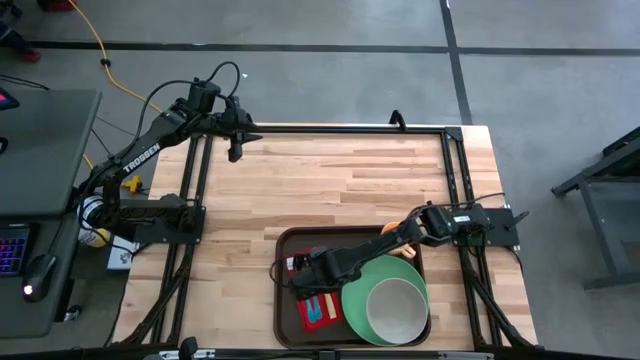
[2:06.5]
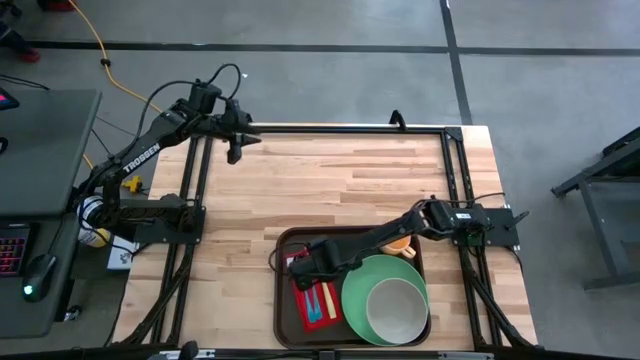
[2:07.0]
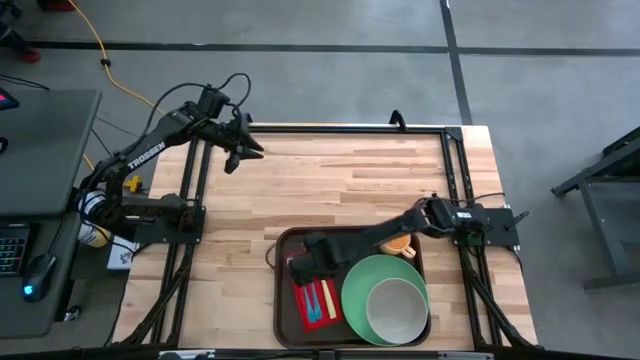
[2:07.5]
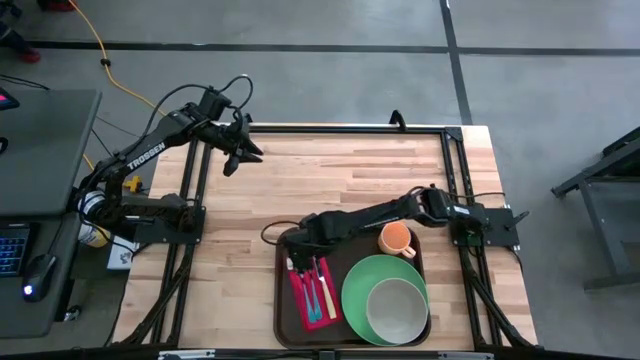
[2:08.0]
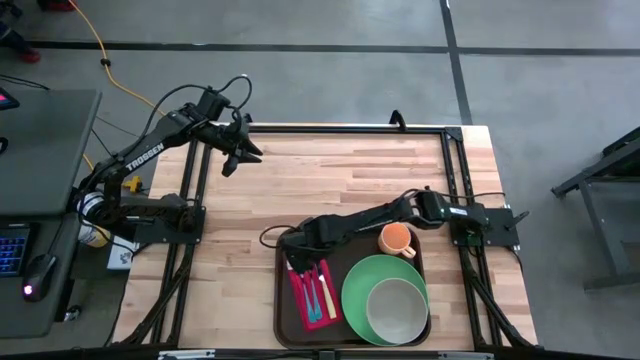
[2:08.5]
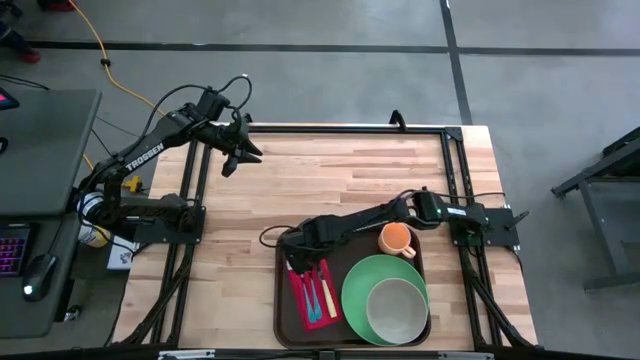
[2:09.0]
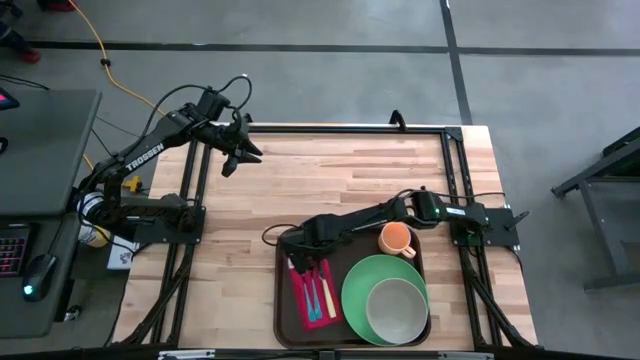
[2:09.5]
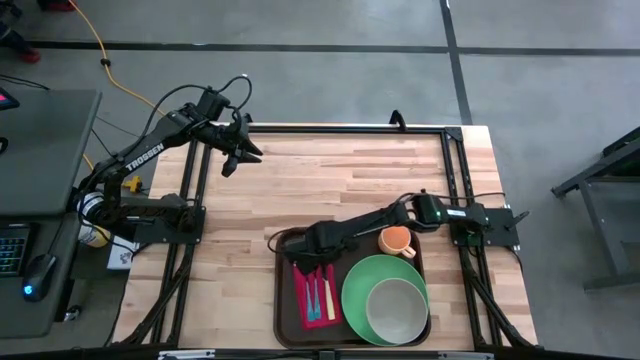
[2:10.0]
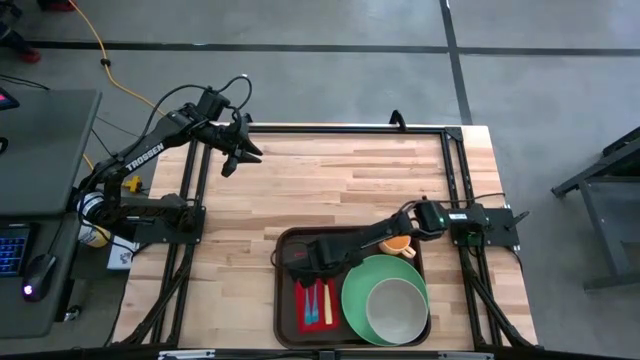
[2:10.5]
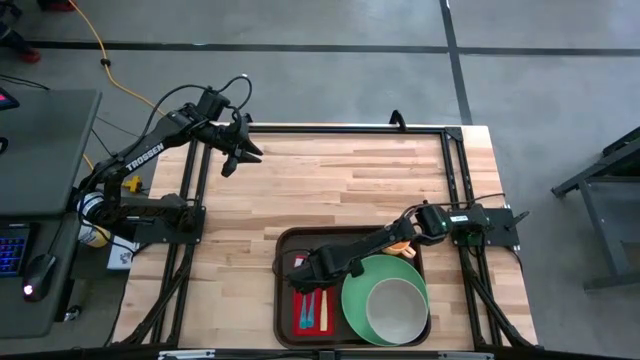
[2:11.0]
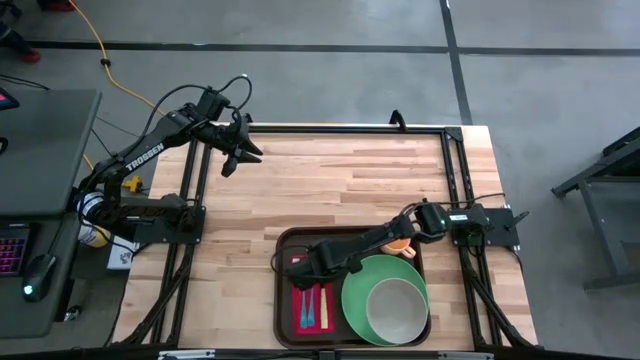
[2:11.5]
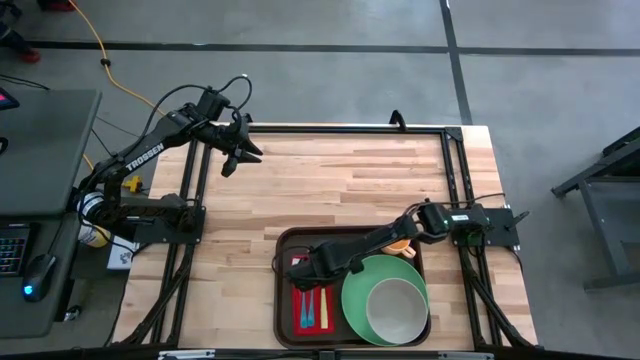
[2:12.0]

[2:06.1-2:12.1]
Task: Set up tray
Adjust the red cloth table napkin

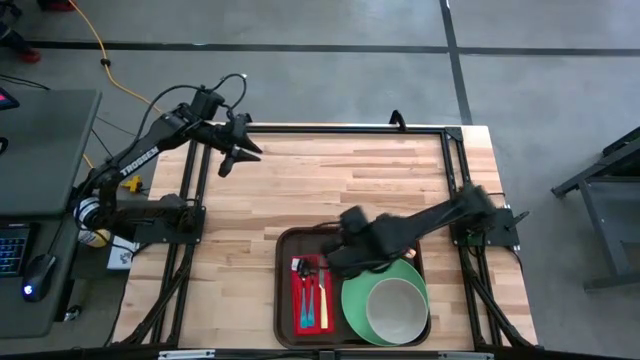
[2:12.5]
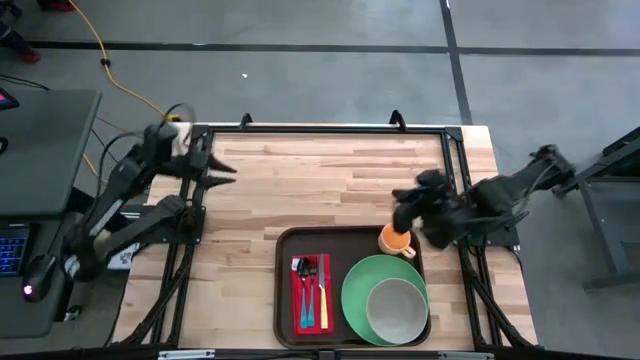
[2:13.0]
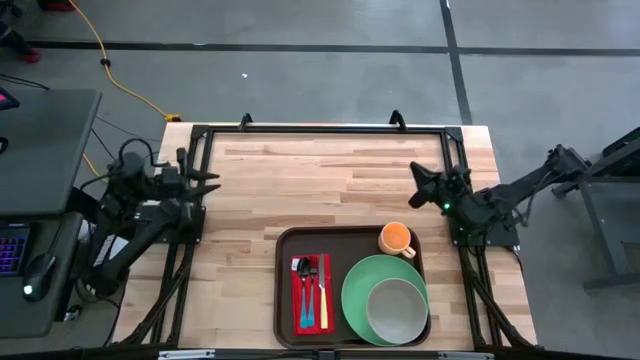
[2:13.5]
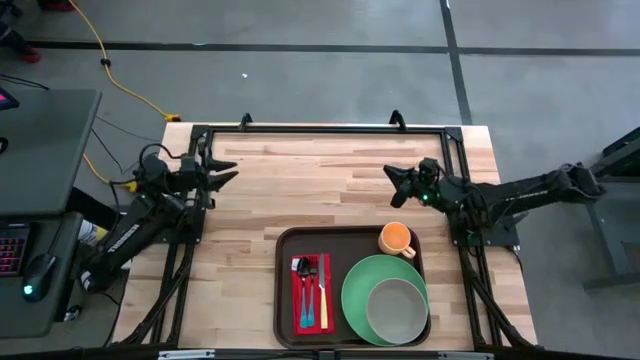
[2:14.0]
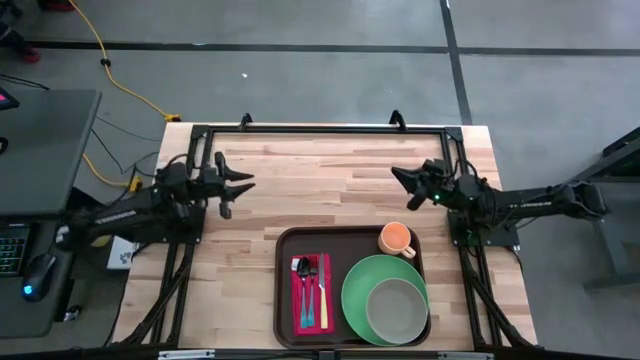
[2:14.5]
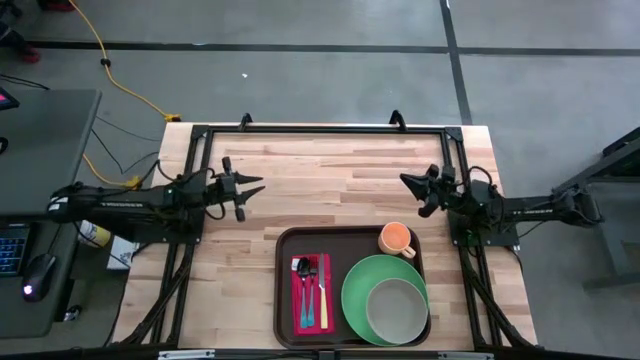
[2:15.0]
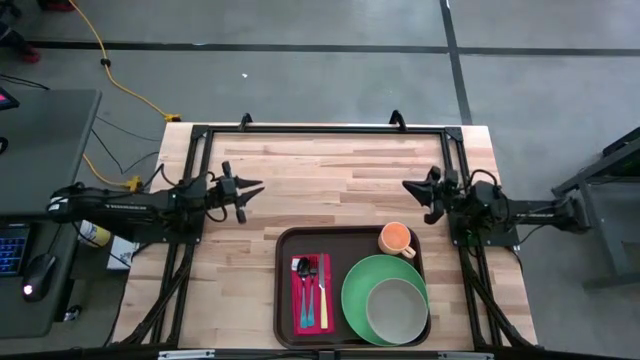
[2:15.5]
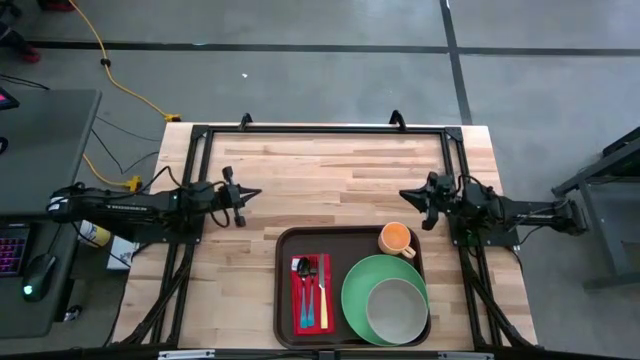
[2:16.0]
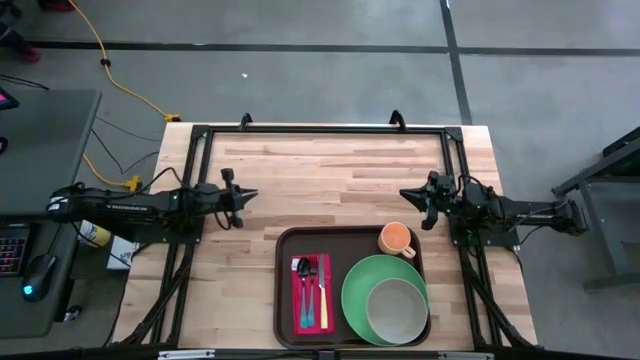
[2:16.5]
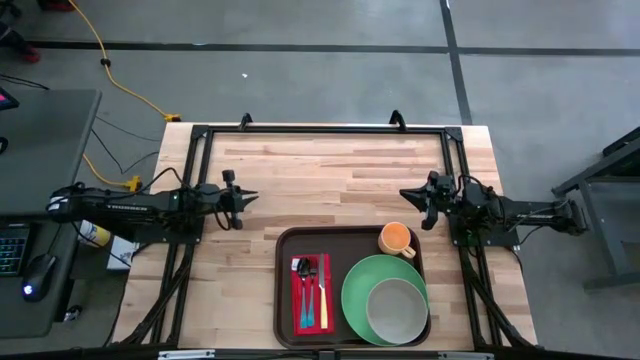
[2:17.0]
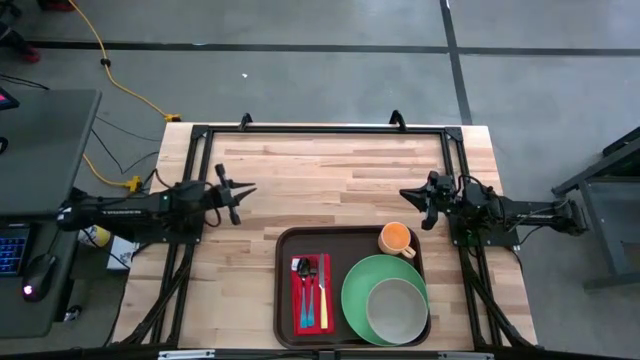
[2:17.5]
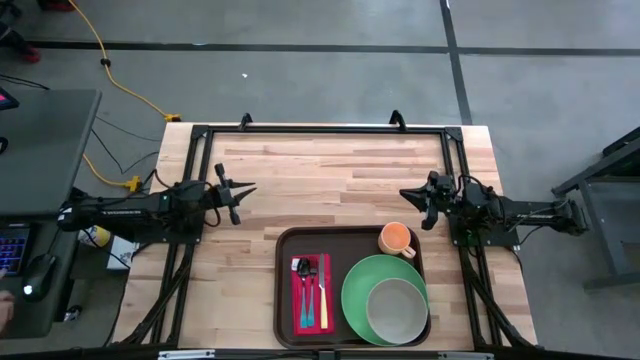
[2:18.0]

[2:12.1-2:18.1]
Return to Home Position

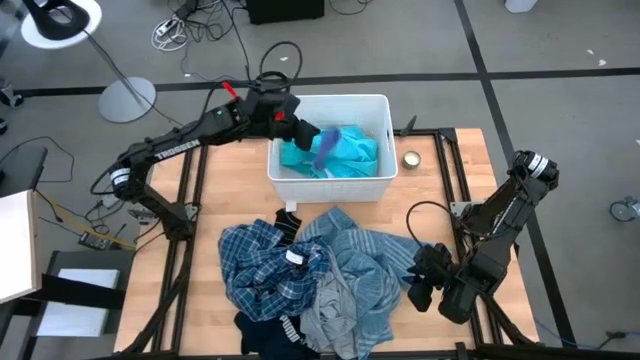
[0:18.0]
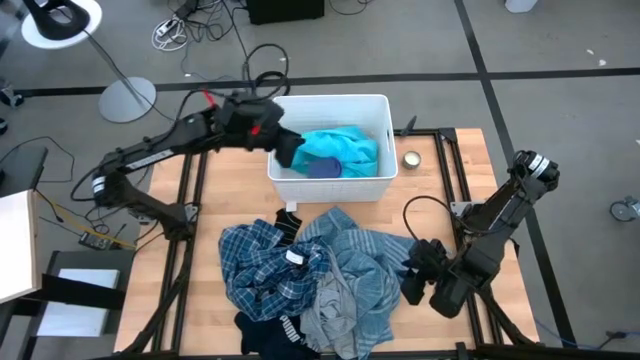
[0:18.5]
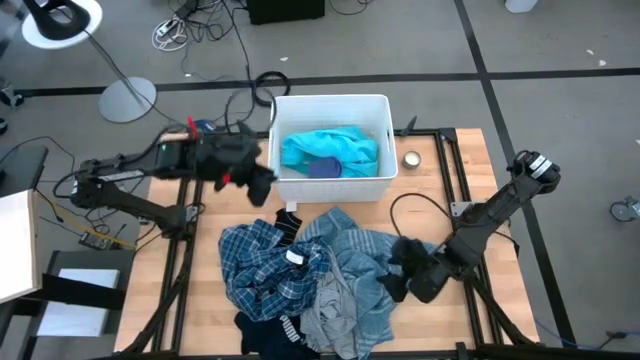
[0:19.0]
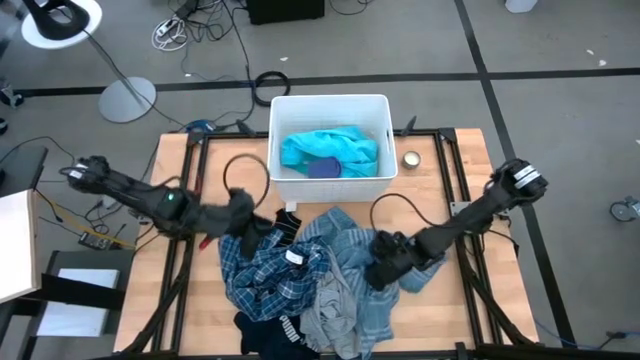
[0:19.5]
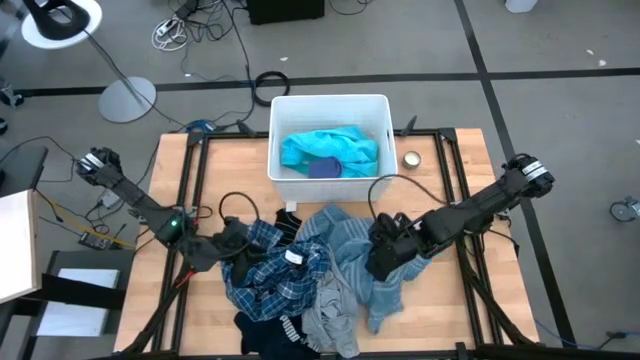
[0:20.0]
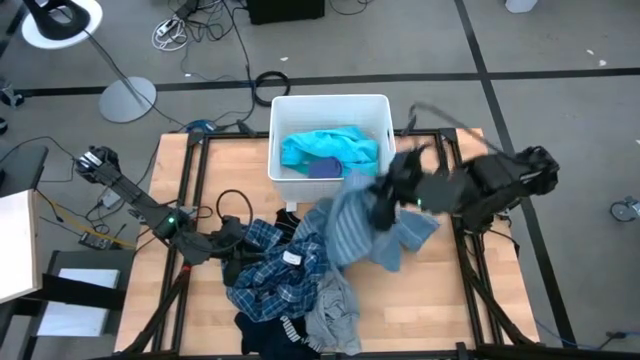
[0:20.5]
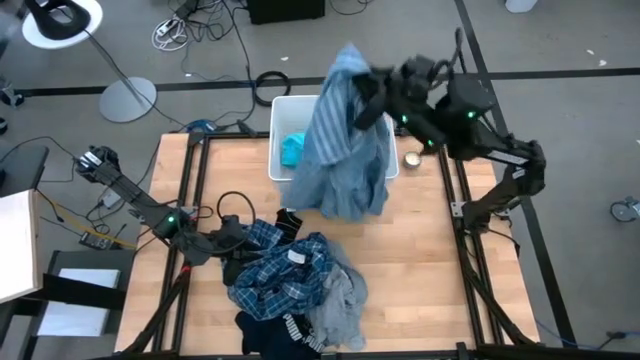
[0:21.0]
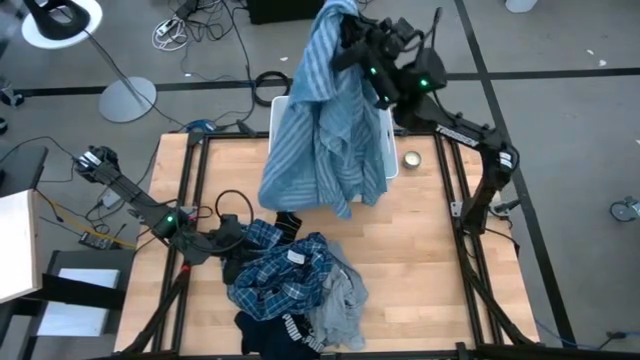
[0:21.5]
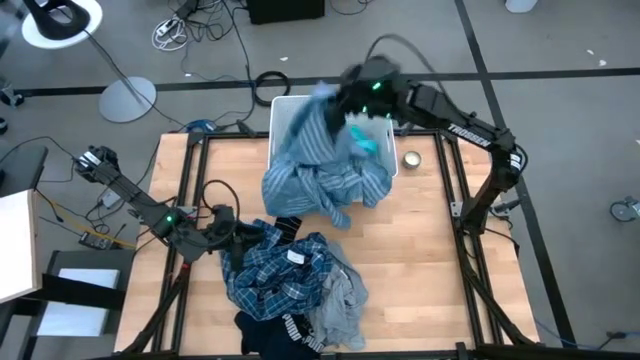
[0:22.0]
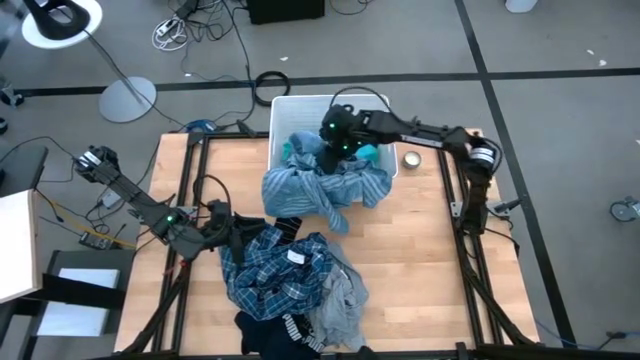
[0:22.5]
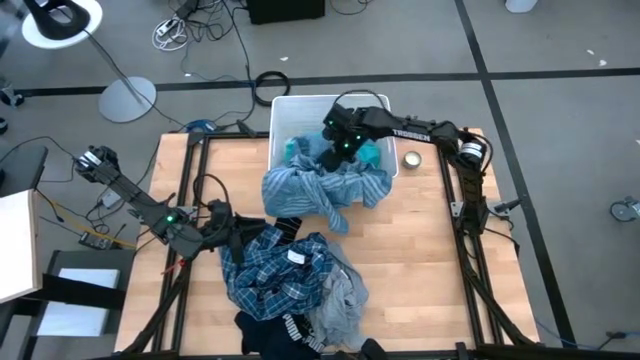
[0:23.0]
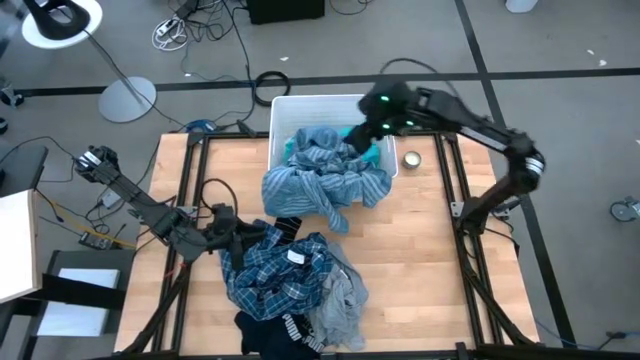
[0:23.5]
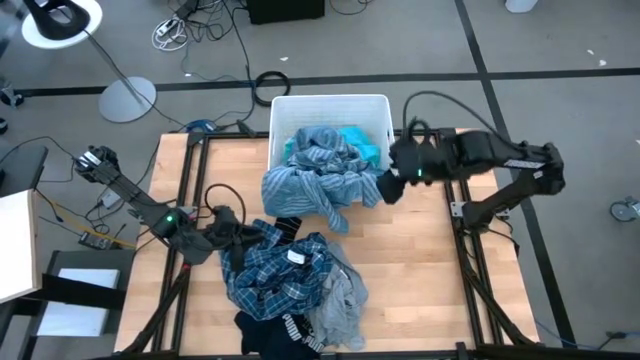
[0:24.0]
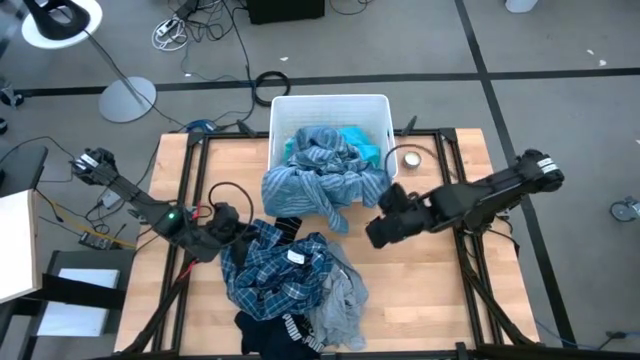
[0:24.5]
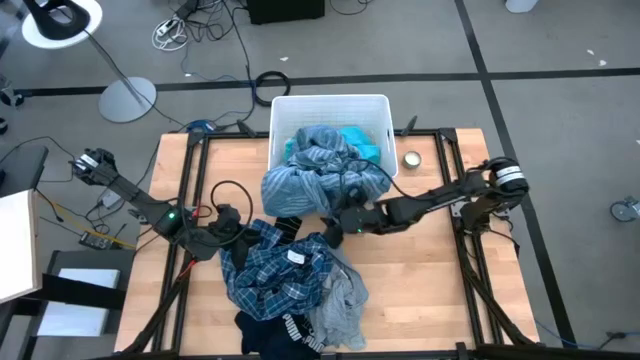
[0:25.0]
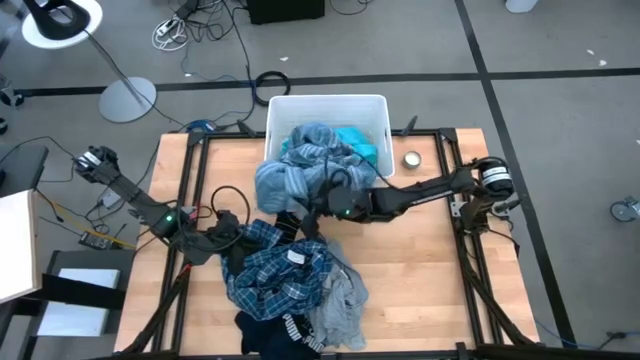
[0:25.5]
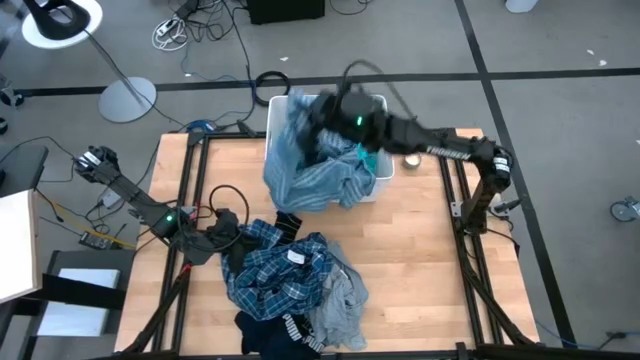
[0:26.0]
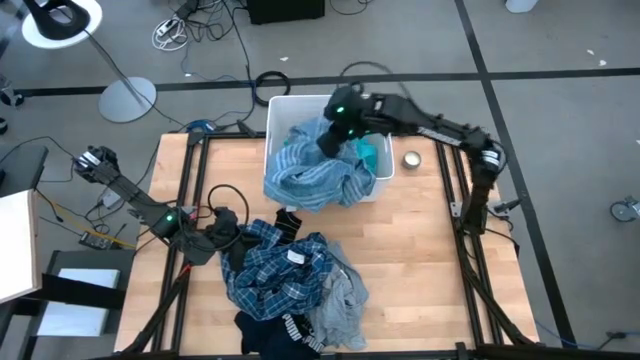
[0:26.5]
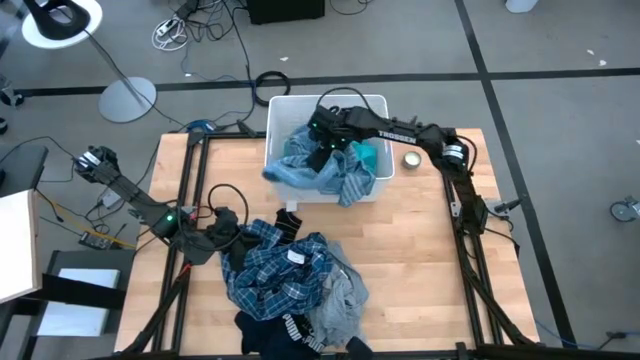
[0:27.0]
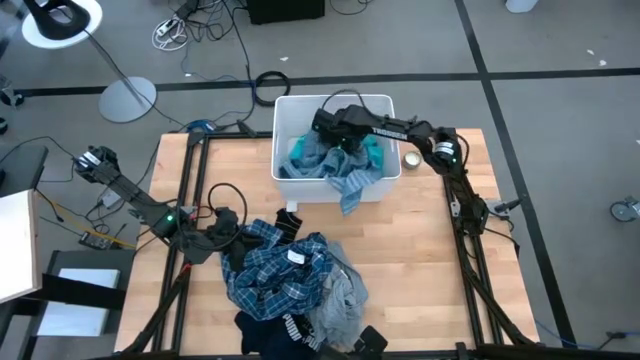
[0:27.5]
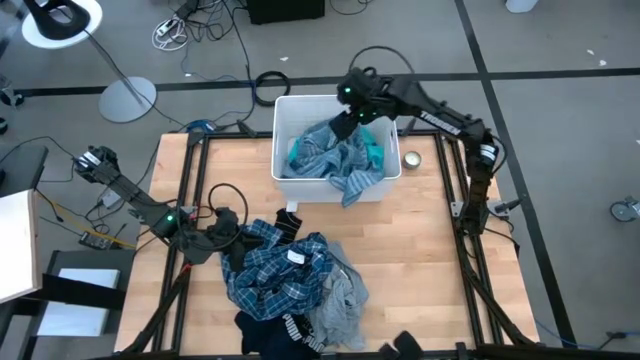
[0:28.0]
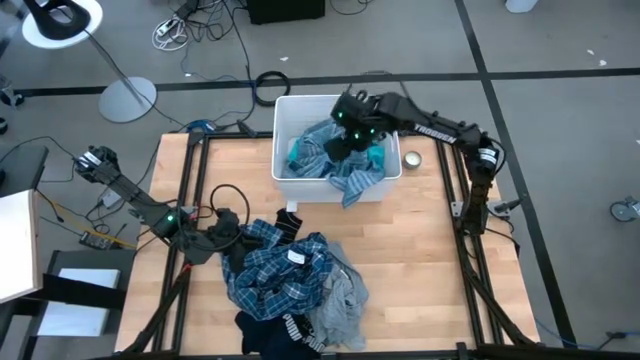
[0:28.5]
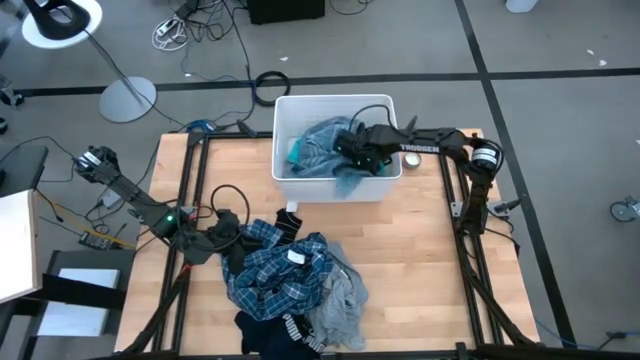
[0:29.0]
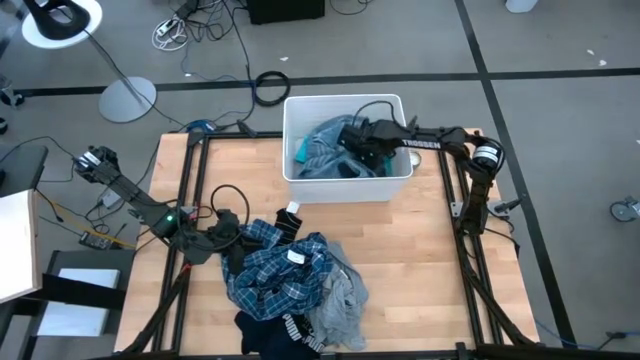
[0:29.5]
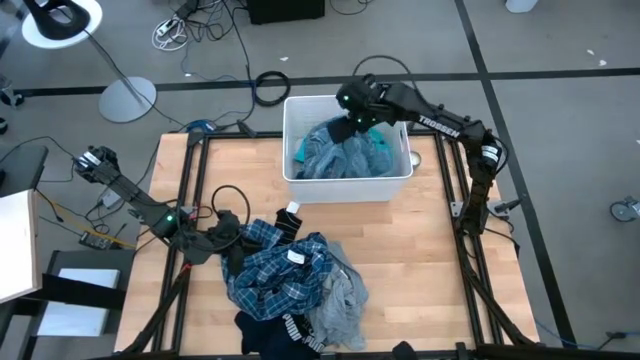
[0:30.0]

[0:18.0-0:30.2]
Task: Sort clothes
Put the blue towel into the laundry bin
